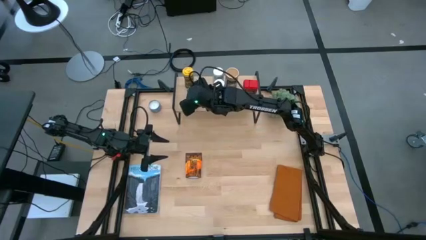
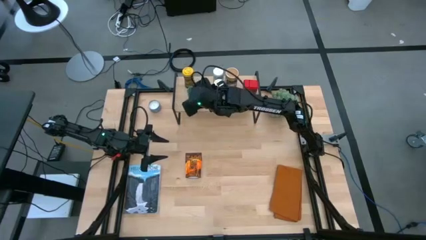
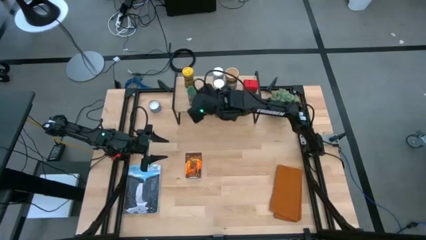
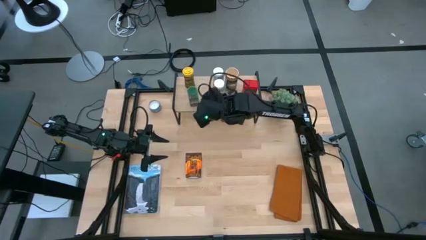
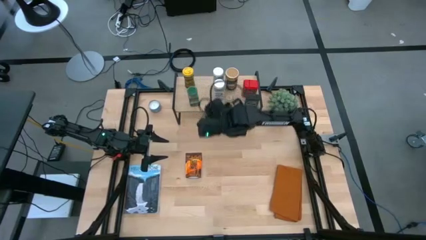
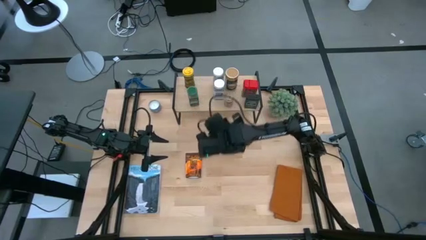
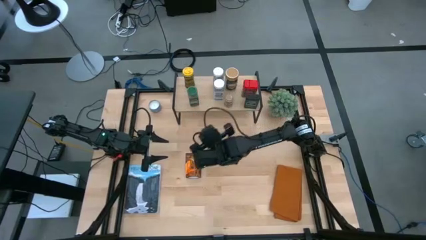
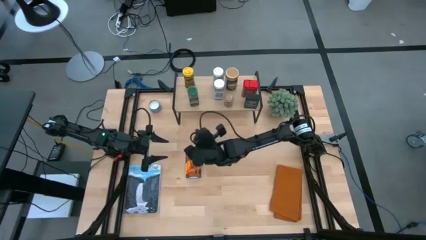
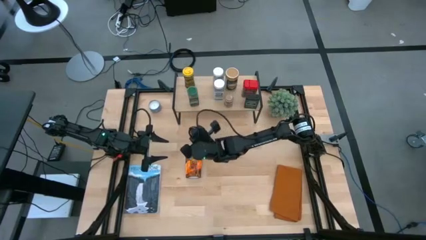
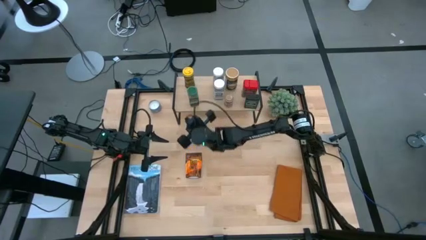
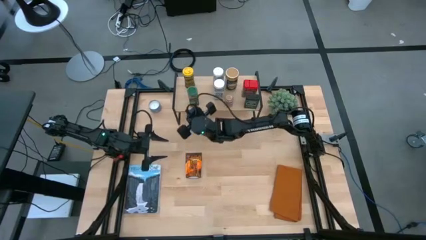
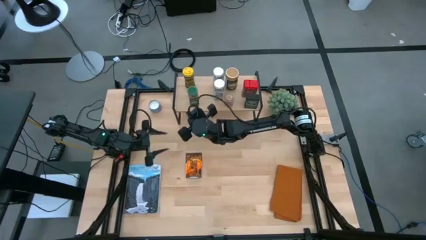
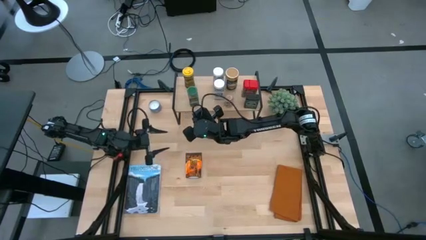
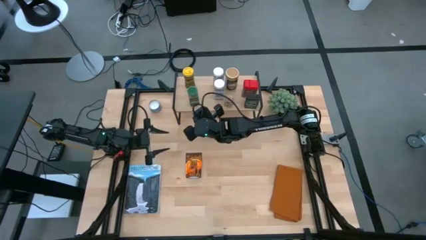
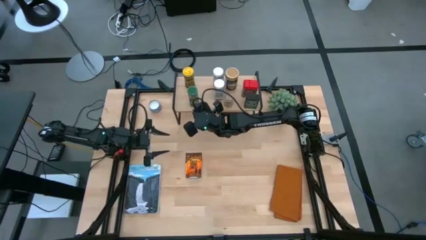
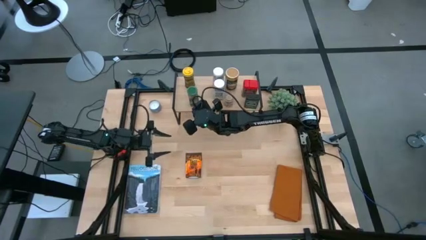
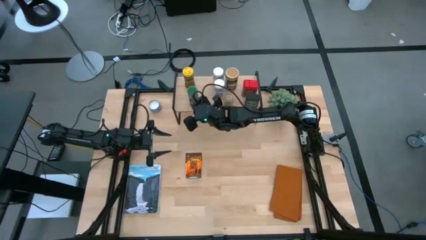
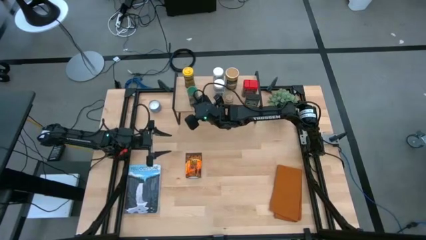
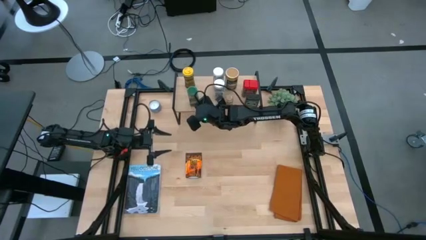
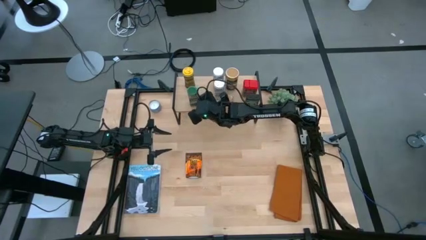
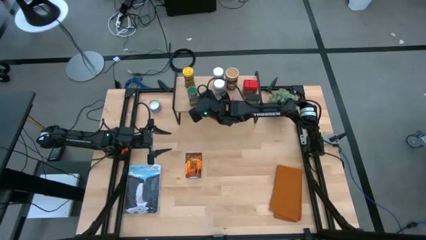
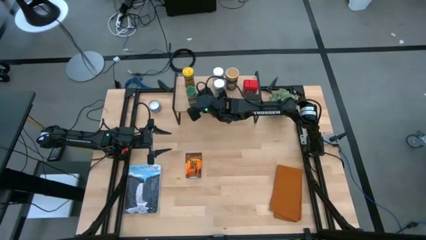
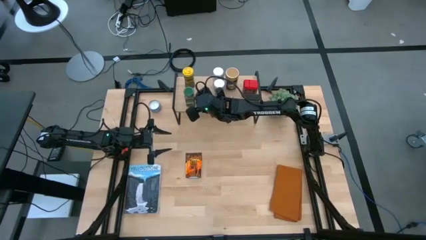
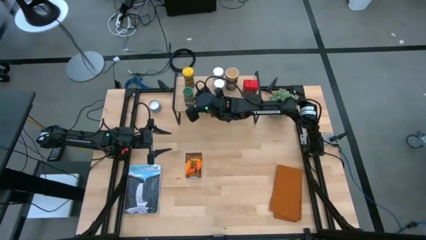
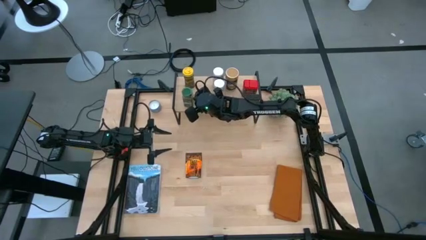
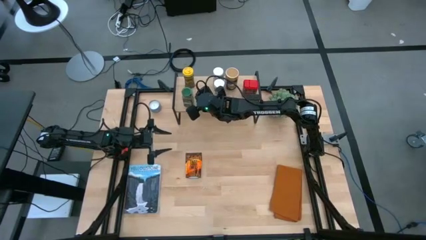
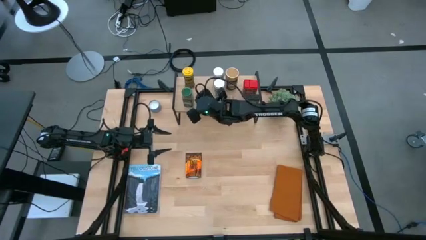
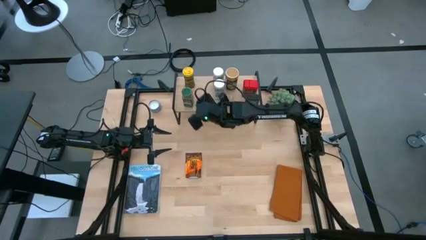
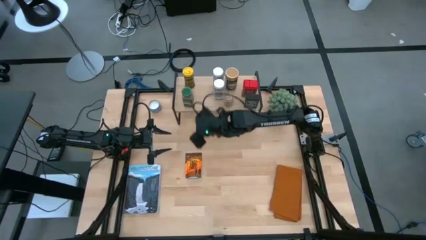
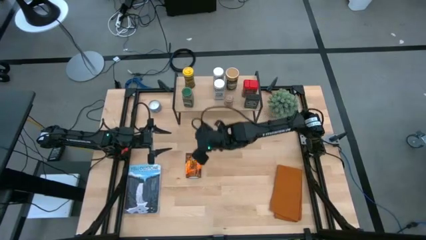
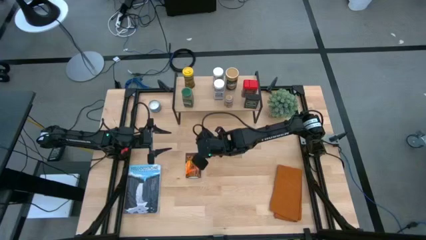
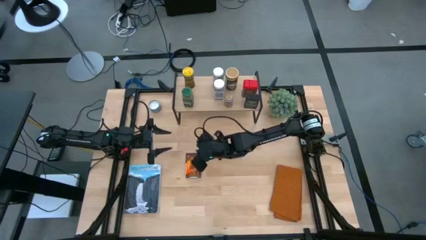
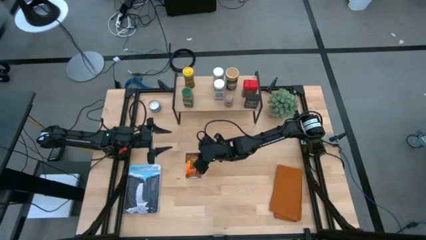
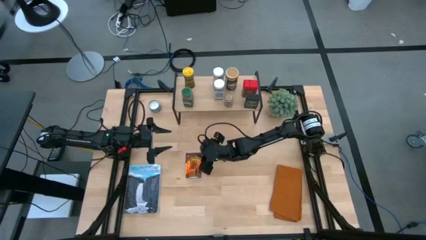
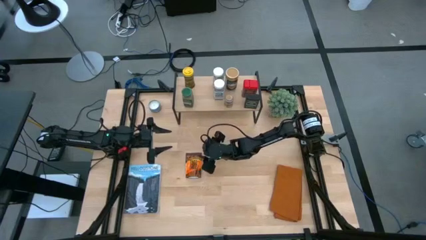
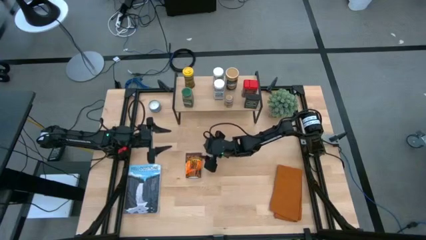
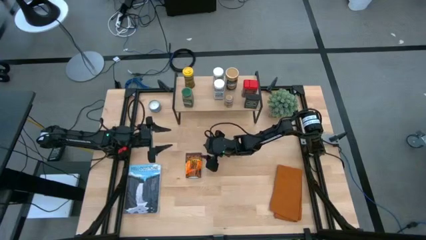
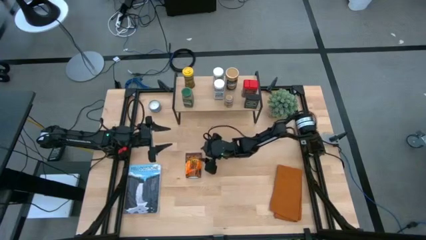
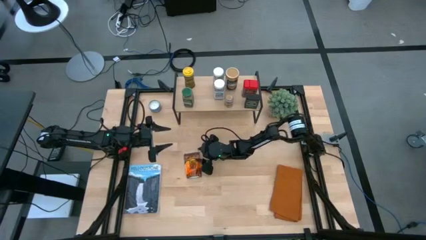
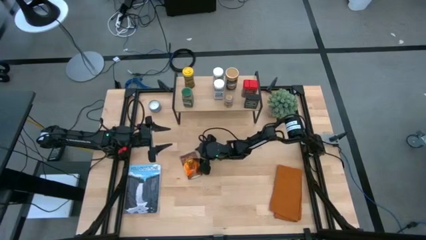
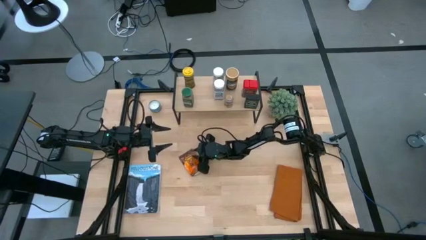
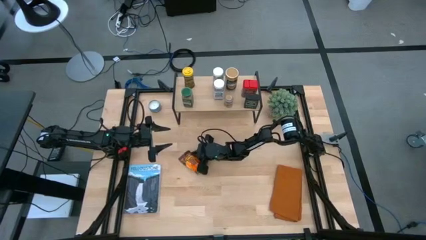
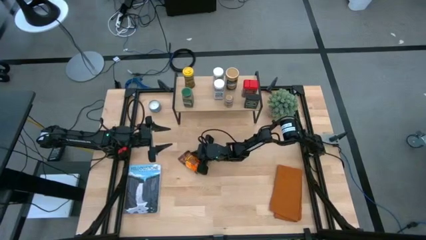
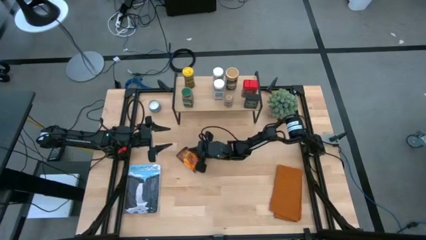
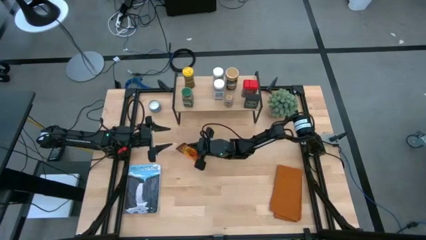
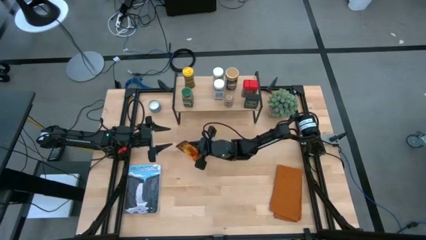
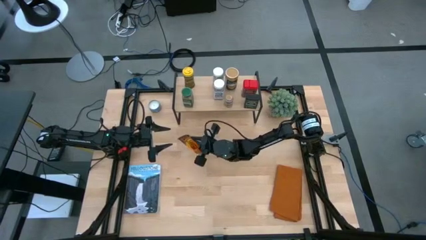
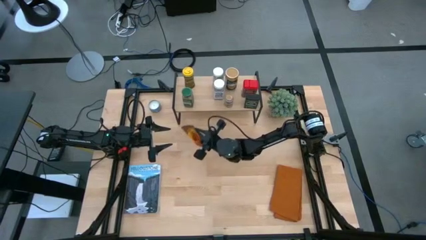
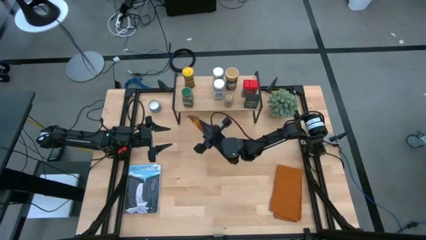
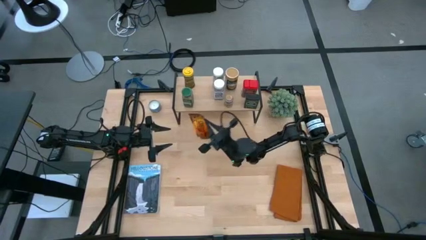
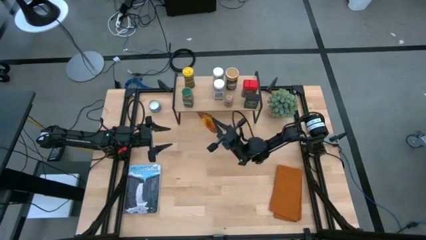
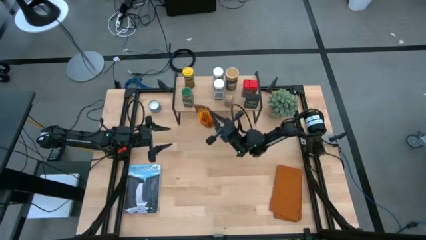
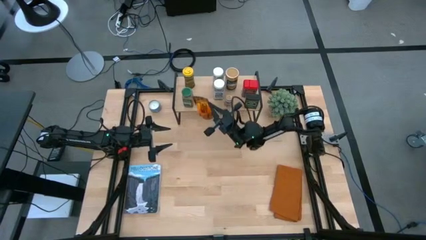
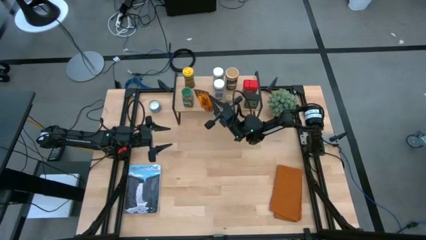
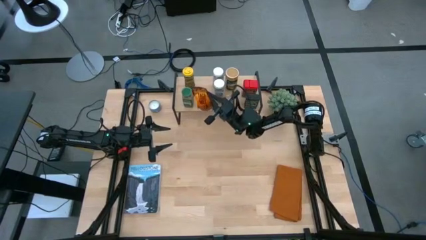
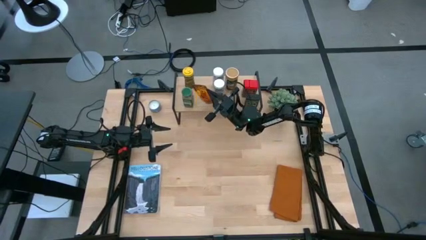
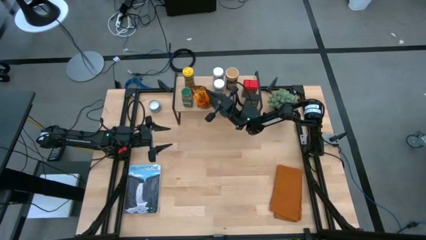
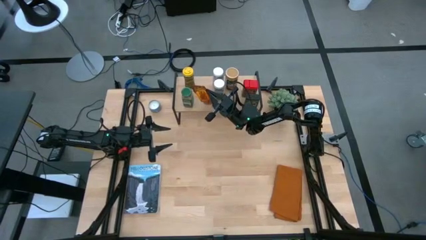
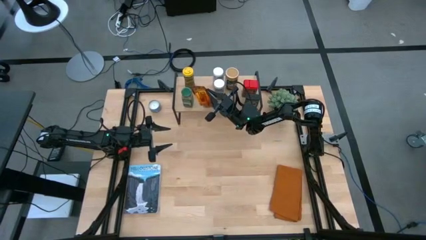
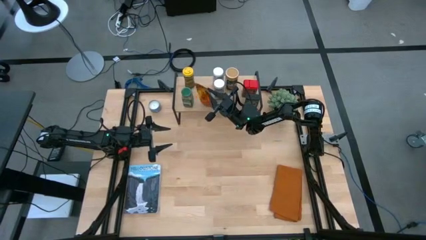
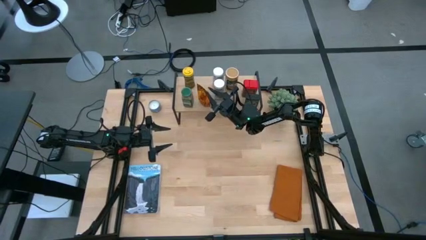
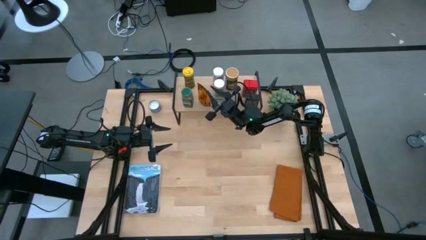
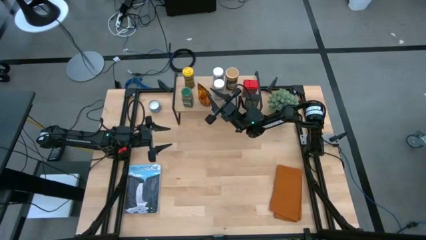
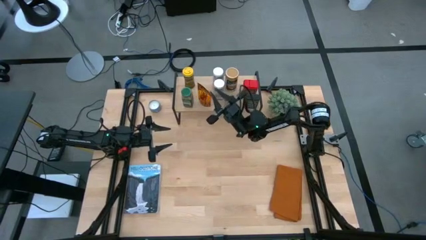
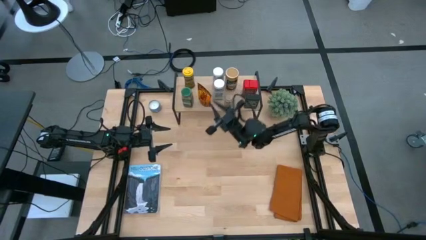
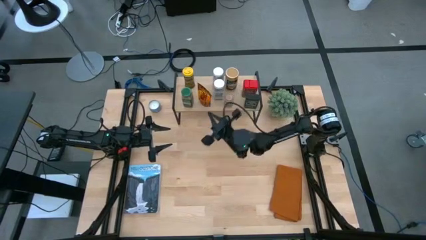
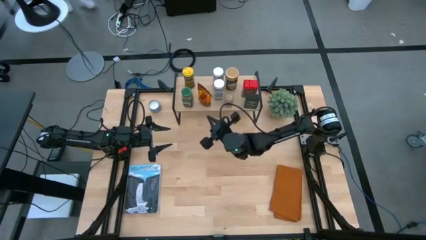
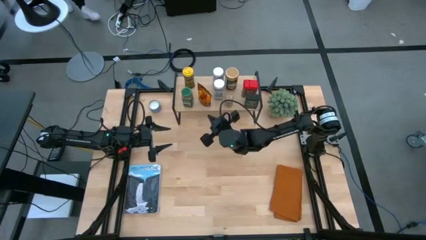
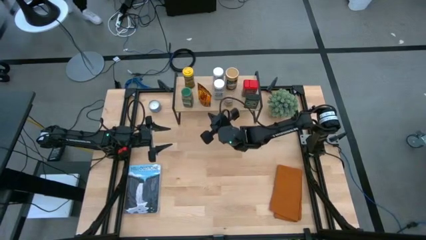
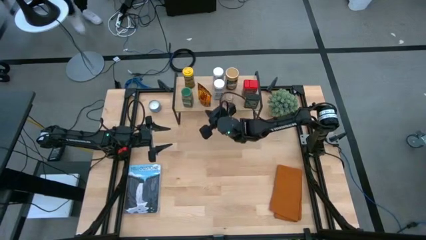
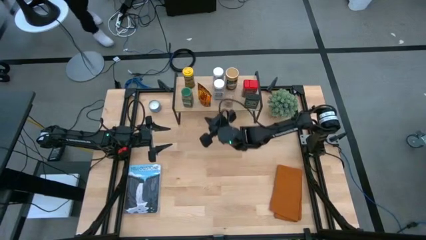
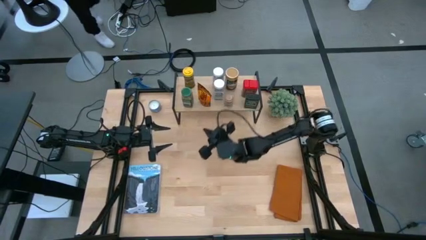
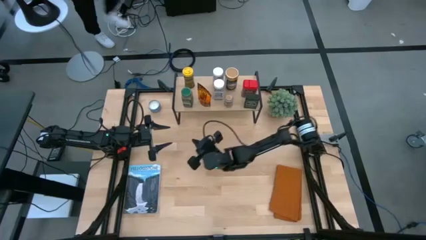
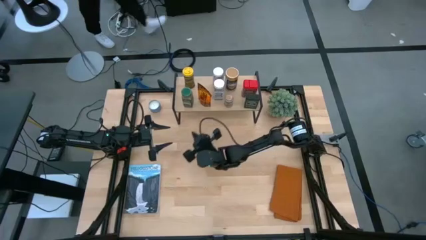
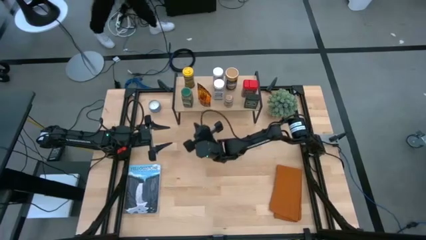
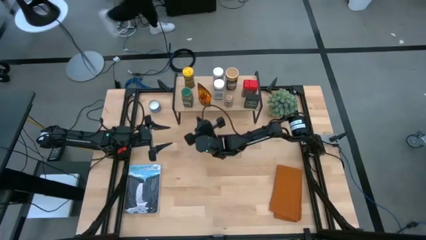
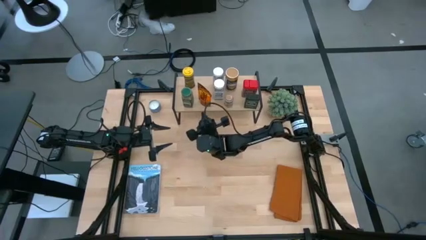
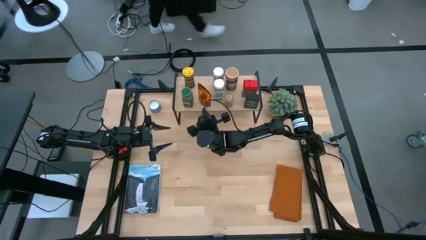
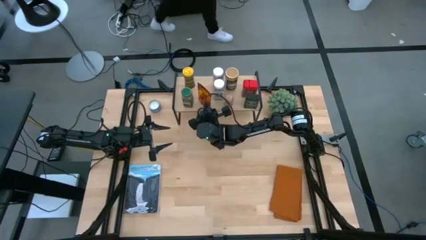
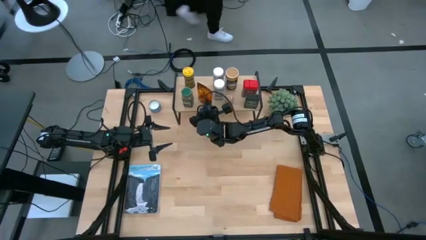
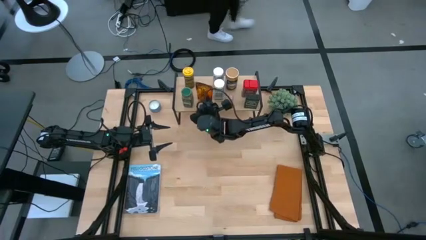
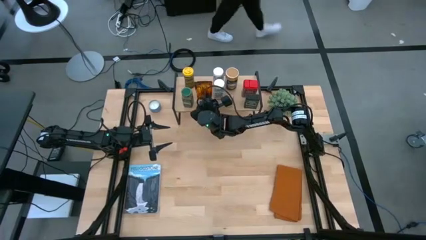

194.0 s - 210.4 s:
Task: Shelf spices
Put the orange bag seasoning on the shelf
